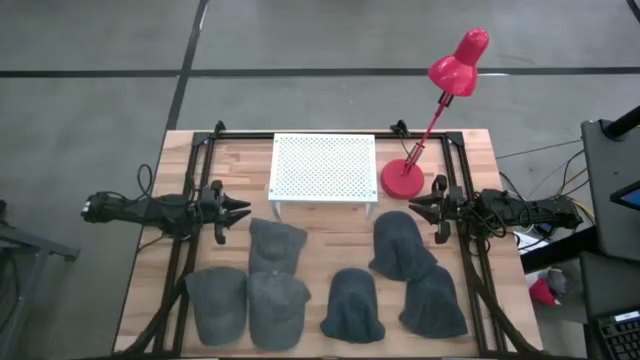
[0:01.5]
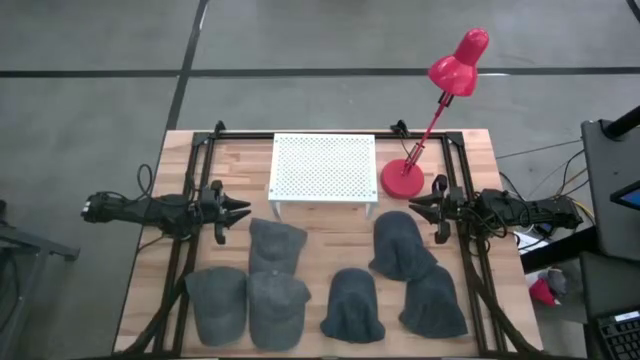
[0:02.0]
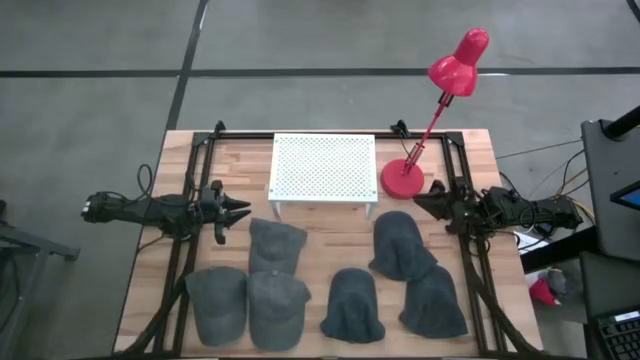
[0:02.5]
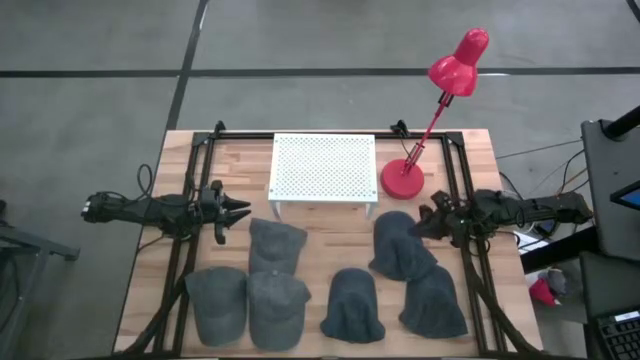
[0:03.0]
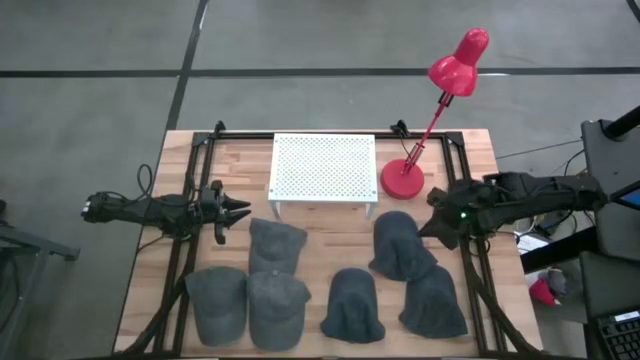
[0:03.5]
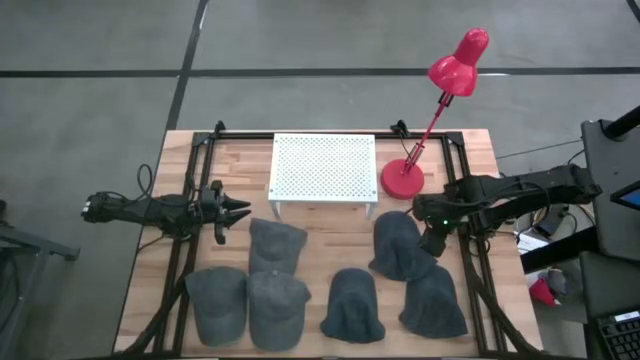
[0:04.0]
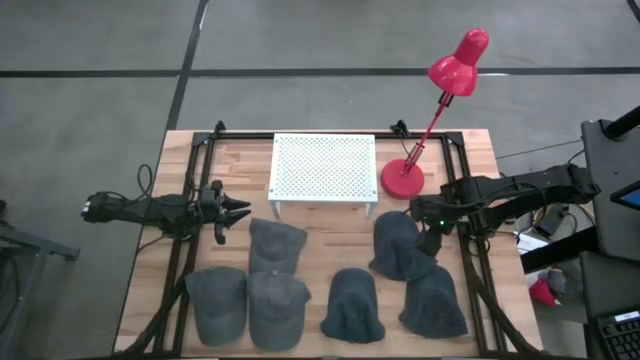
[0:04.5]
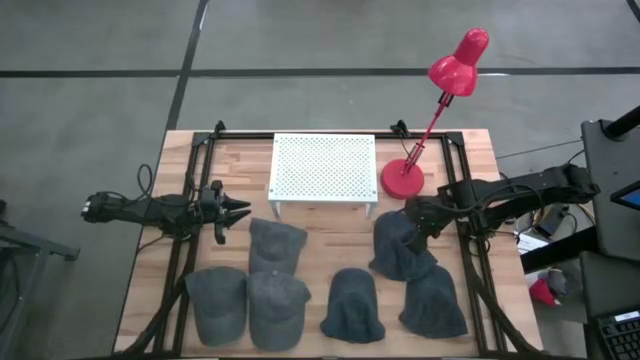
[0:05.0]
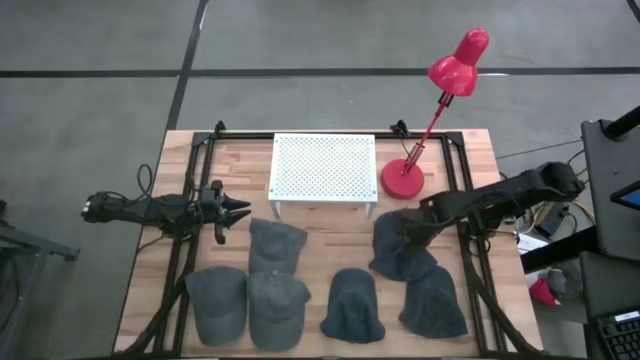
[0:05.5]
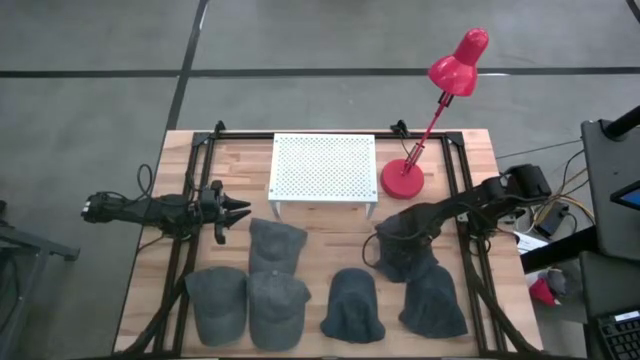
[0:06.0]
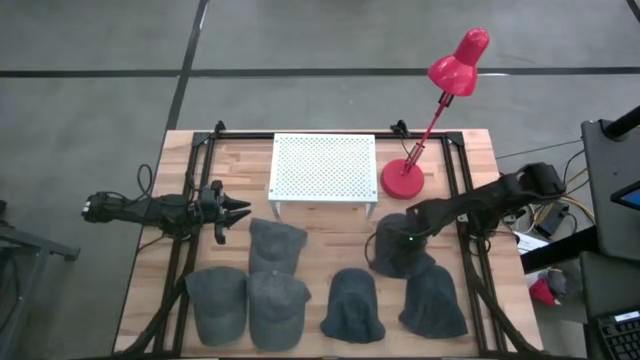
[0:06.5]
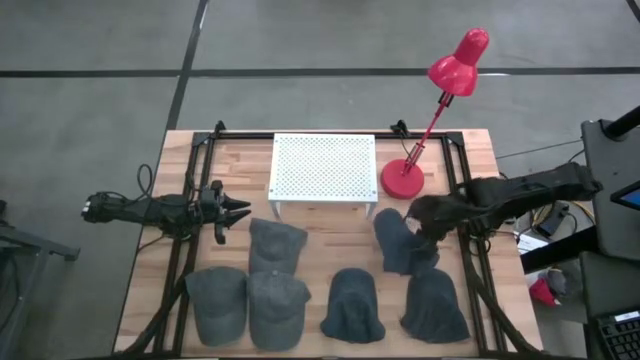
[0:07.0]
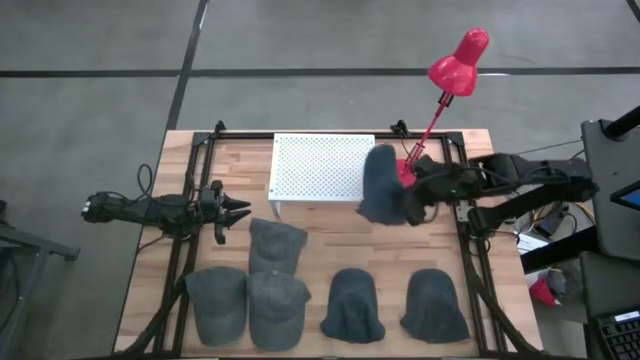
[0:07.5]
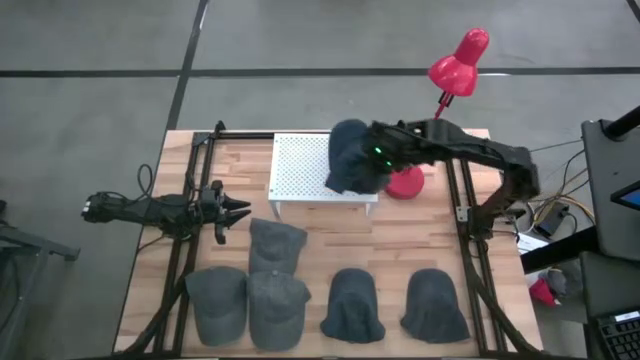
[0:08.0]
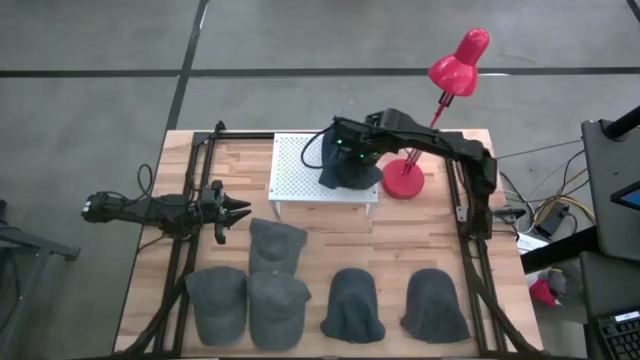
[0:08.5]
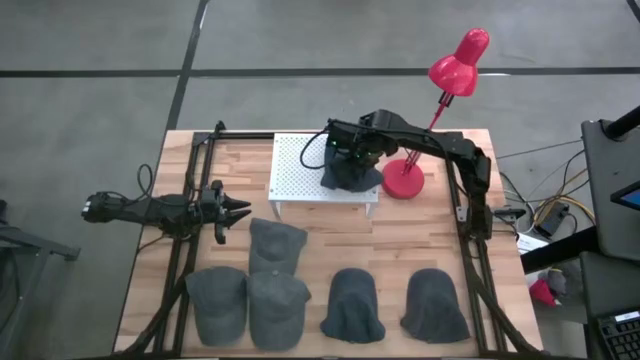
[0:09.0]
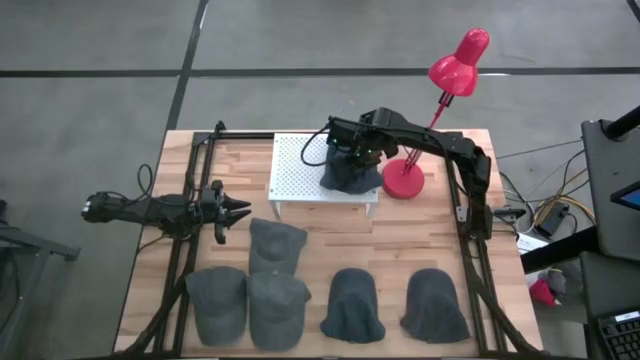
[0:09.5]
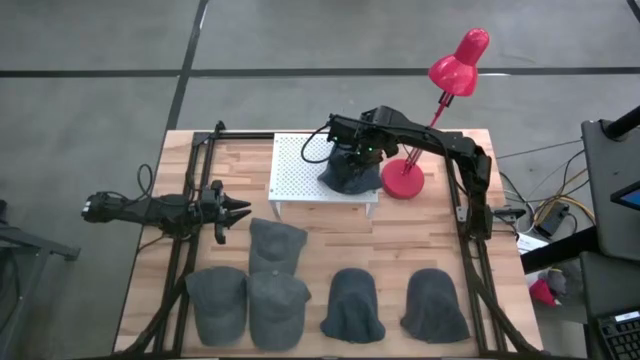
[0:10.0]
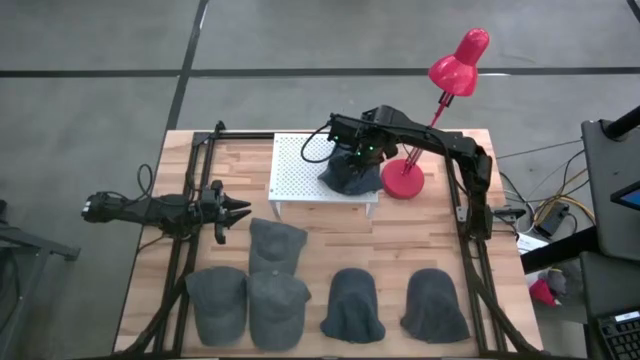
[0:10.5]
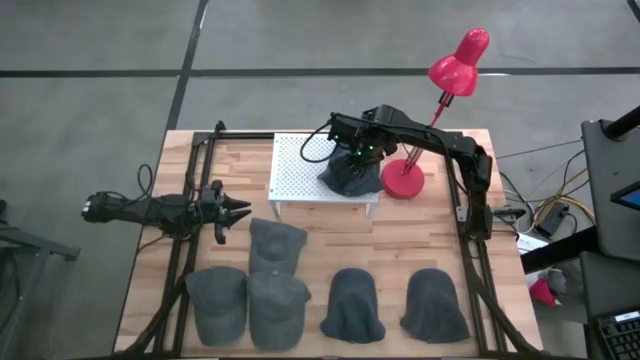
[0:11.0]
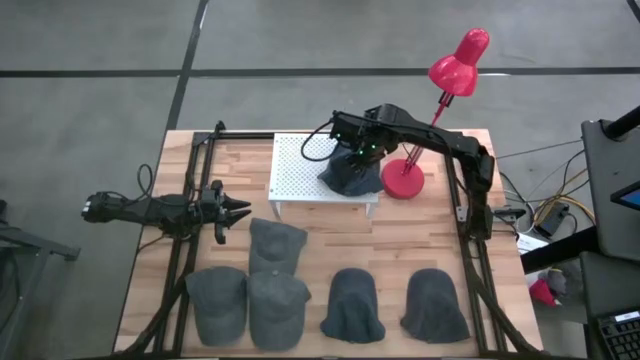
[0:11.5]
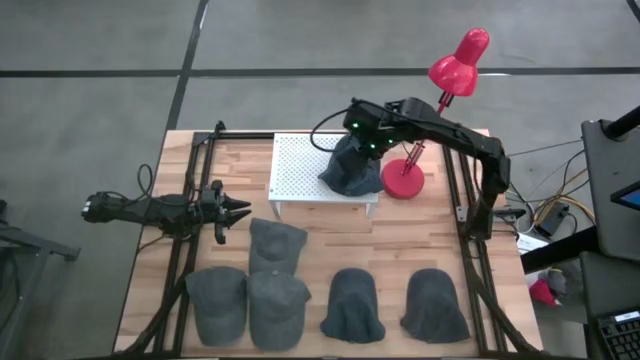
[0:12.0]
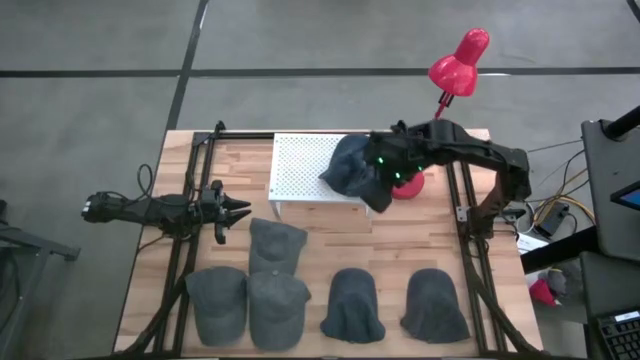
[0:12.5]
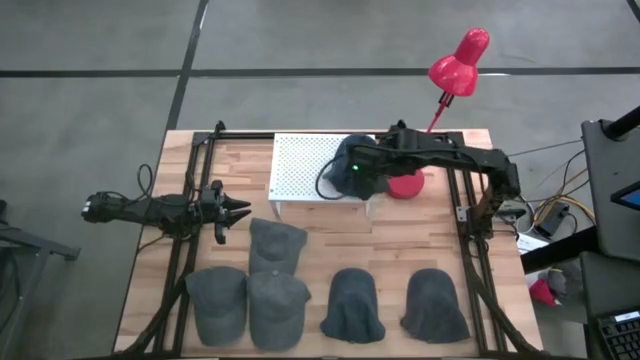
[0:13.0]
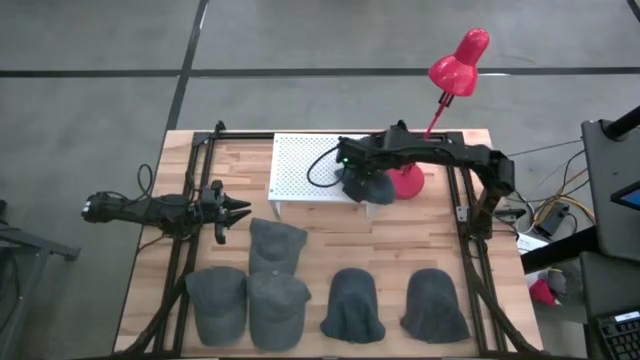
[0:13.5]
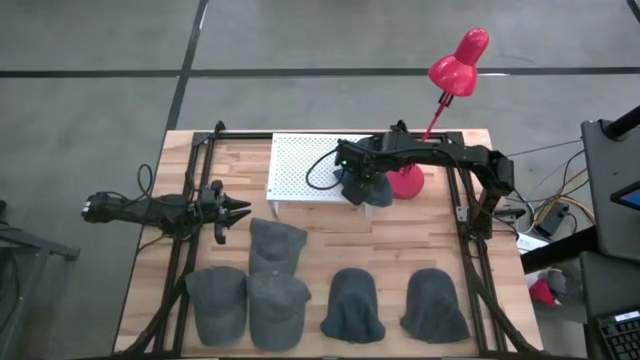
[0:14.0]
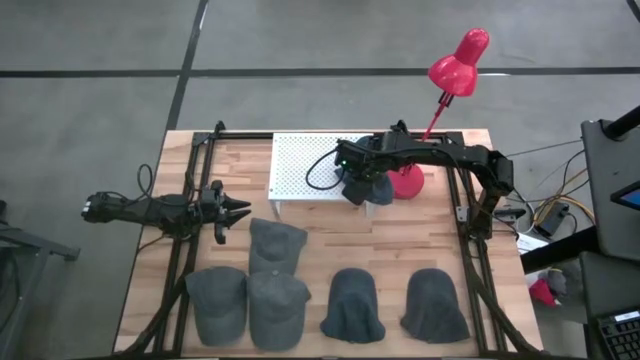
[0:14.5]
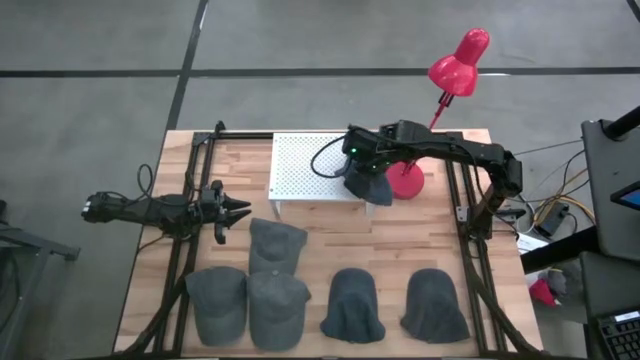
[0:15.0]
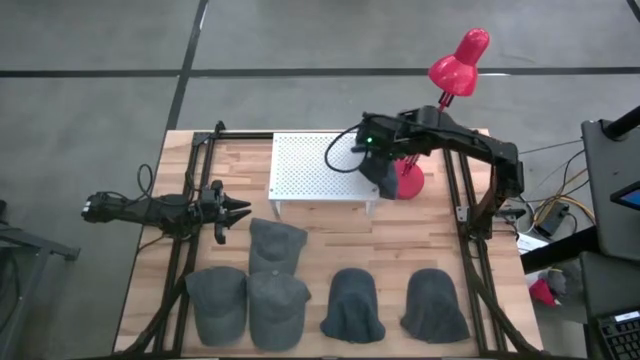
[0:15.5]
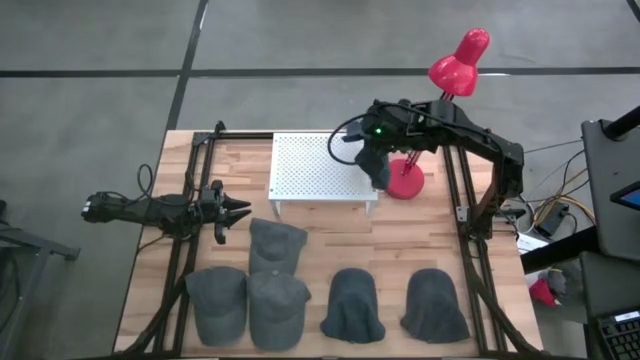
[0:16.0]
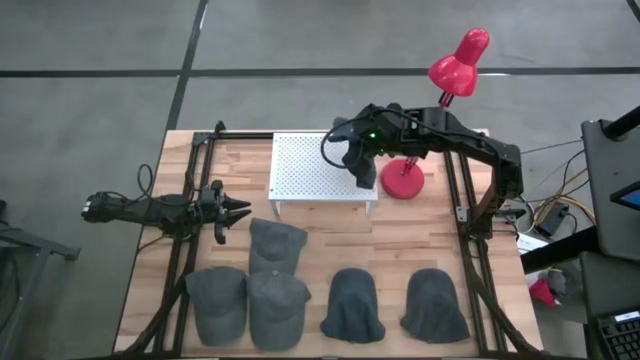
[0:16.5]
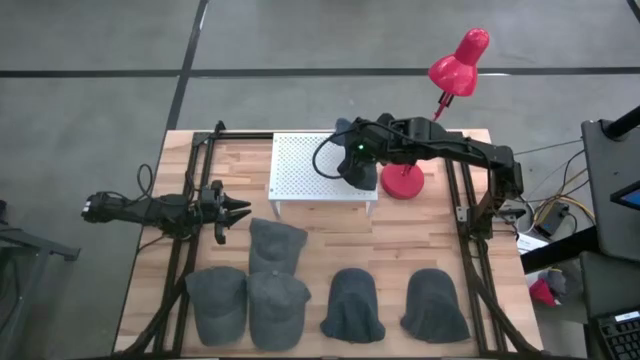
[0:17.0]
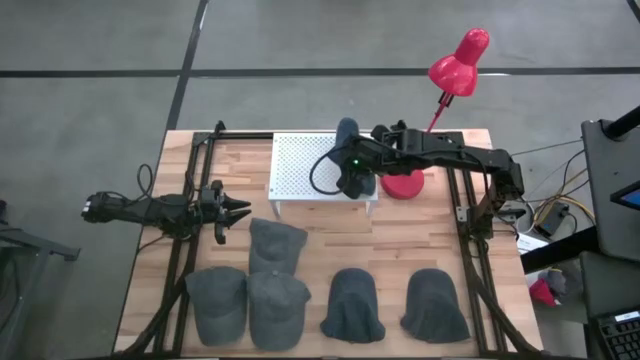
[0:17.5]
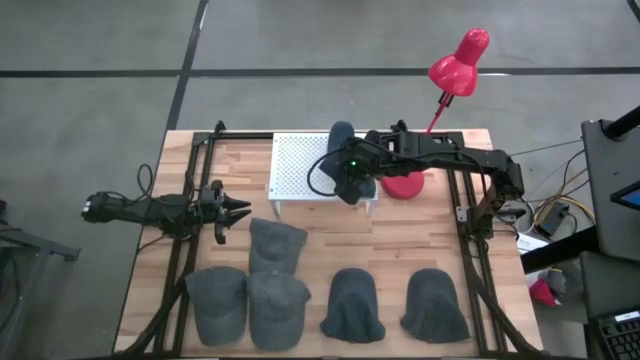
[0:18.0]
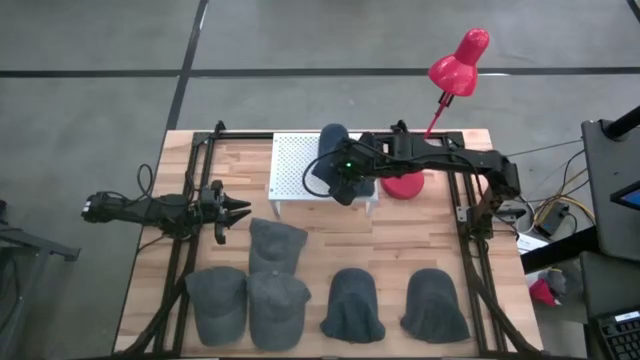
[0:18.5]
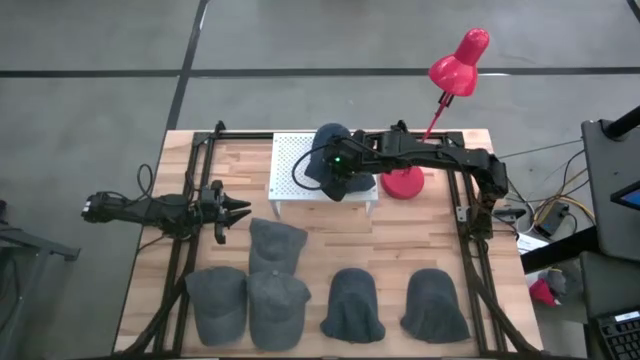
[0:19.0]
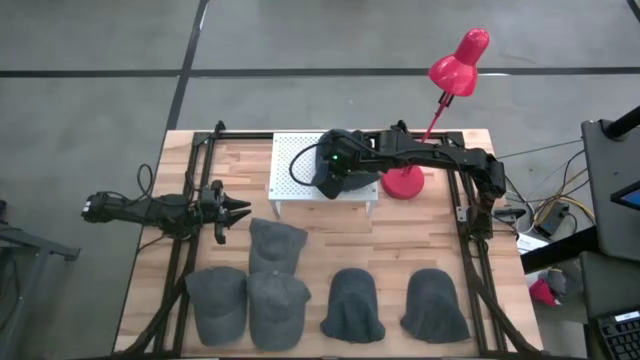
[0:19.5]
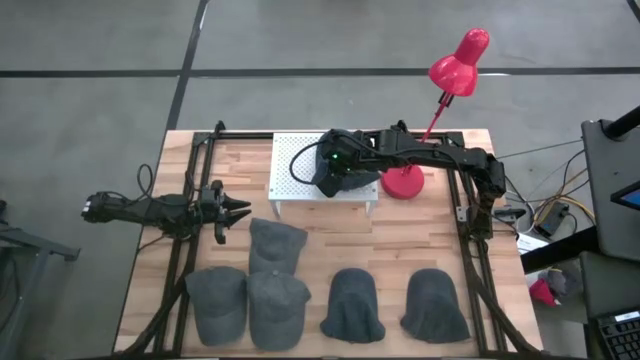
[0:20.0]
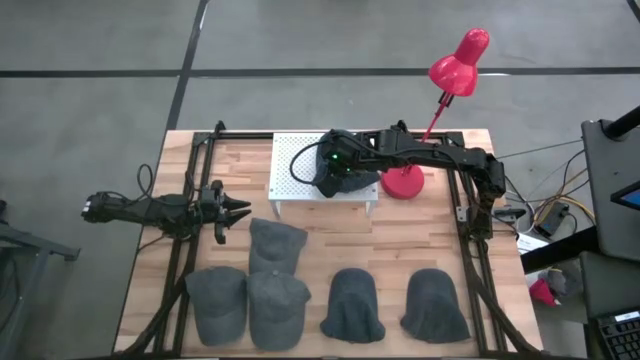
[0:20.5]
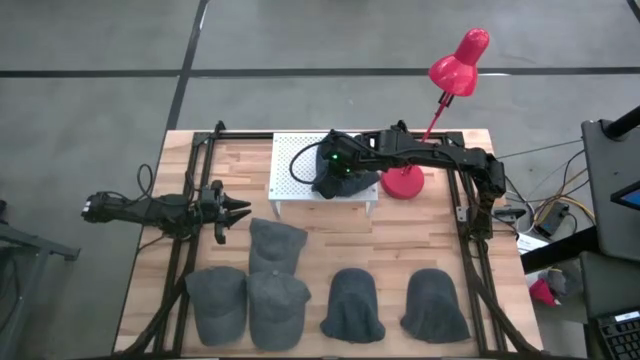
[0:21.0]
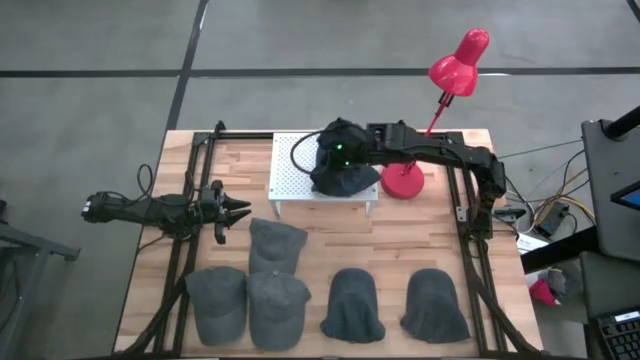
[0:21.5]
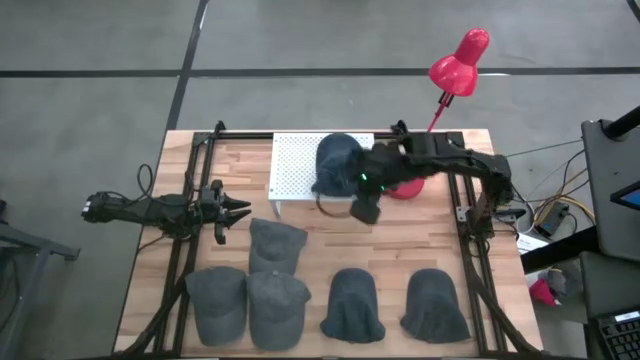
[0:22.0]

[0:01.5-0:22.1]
Task: Pick & Place hat
Put the top blue cap on the shelf
